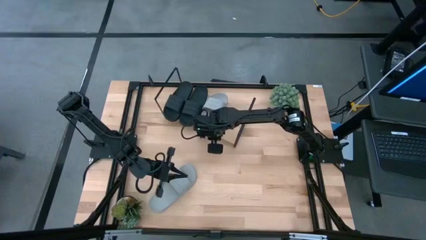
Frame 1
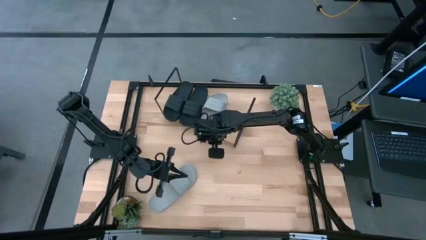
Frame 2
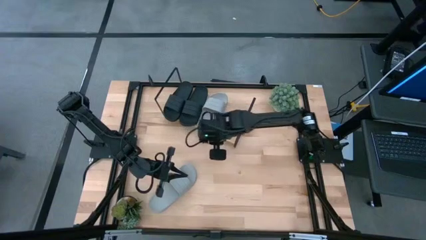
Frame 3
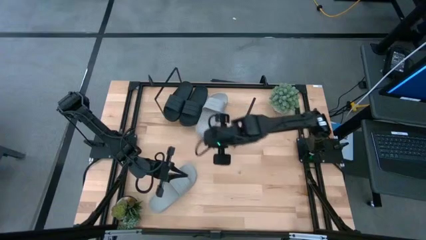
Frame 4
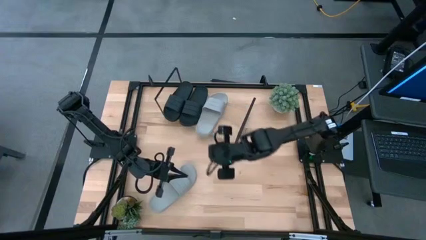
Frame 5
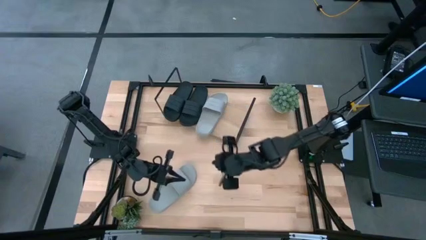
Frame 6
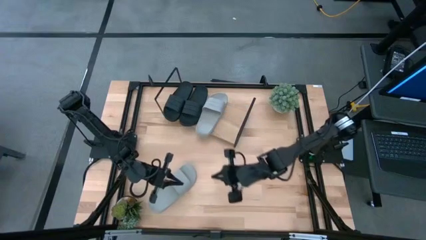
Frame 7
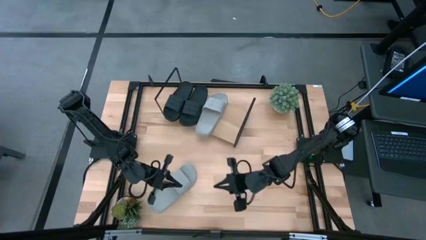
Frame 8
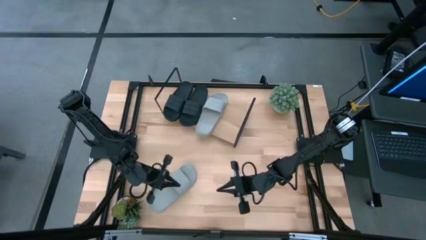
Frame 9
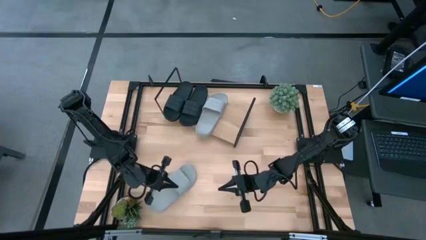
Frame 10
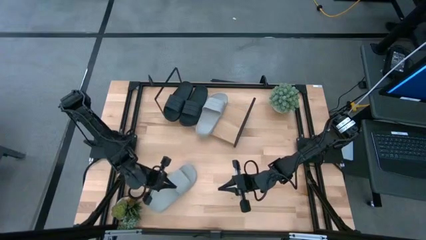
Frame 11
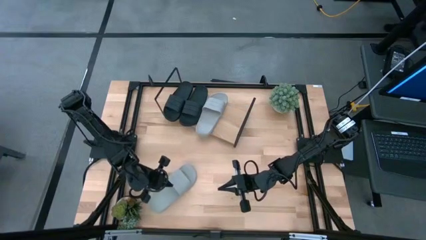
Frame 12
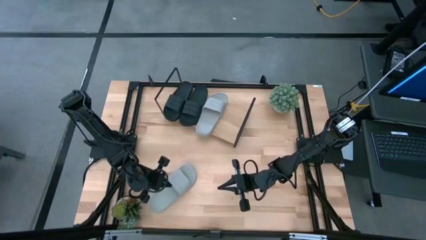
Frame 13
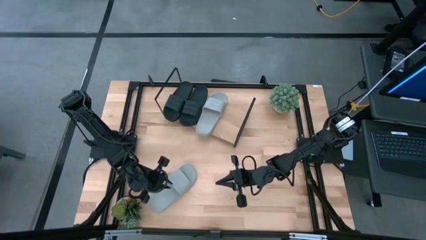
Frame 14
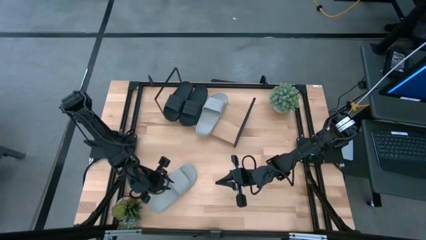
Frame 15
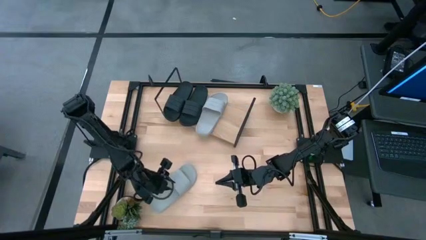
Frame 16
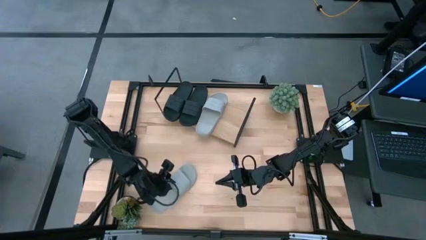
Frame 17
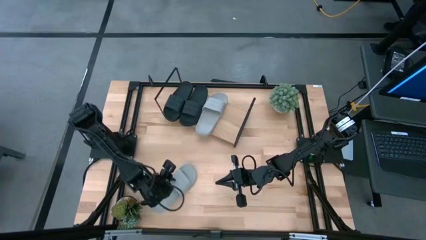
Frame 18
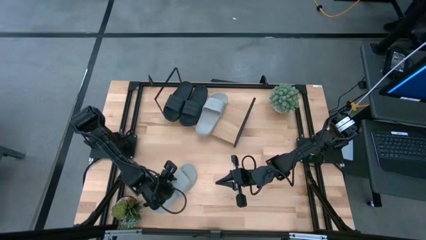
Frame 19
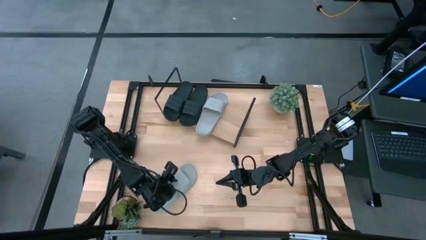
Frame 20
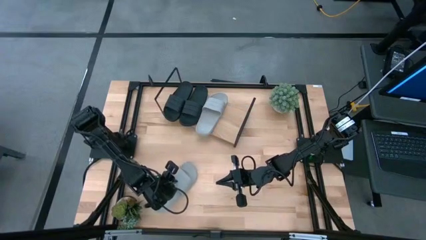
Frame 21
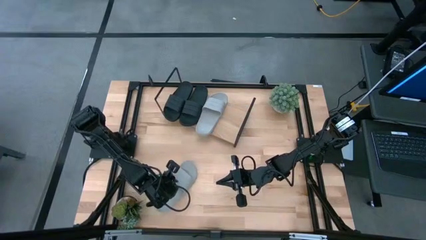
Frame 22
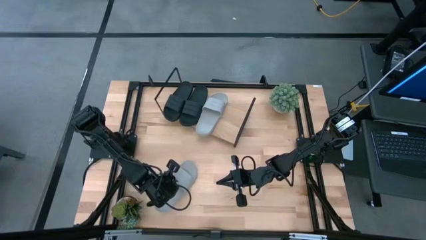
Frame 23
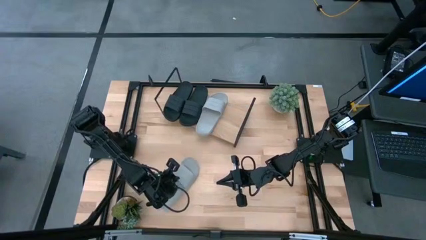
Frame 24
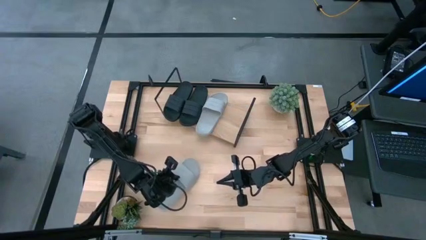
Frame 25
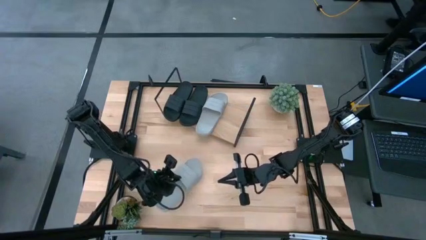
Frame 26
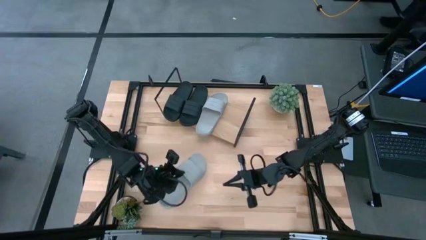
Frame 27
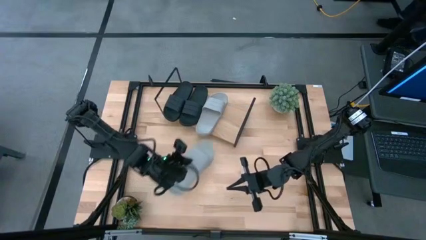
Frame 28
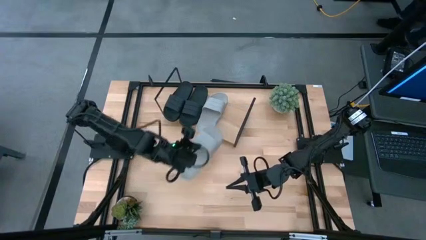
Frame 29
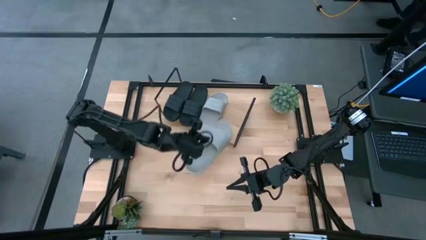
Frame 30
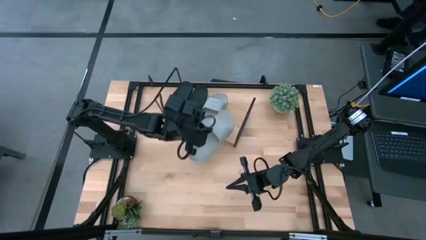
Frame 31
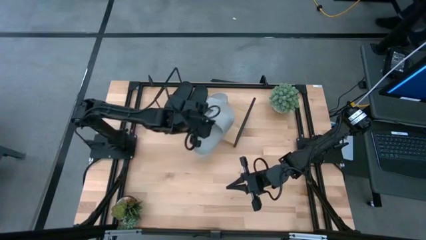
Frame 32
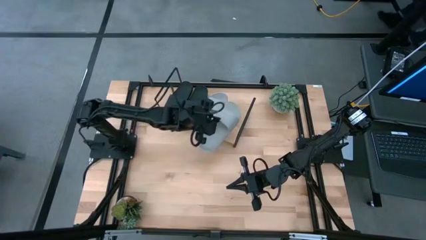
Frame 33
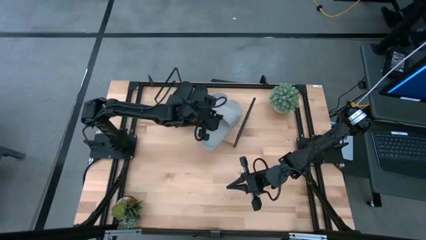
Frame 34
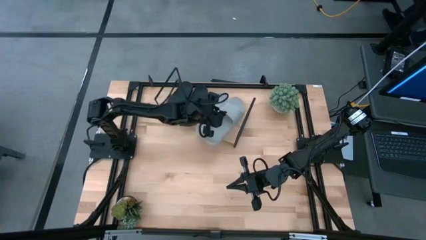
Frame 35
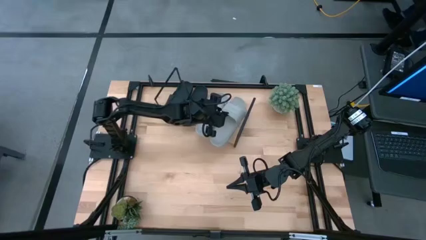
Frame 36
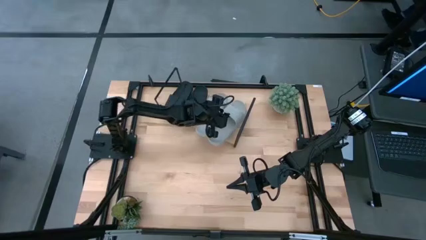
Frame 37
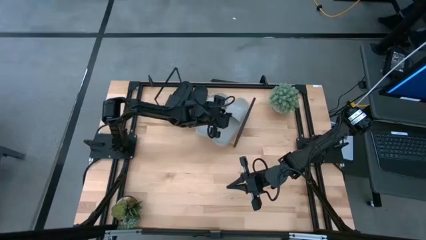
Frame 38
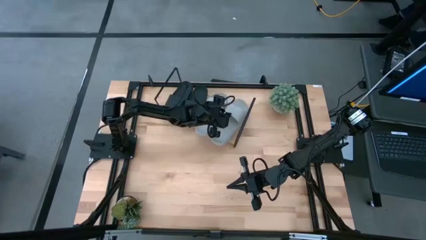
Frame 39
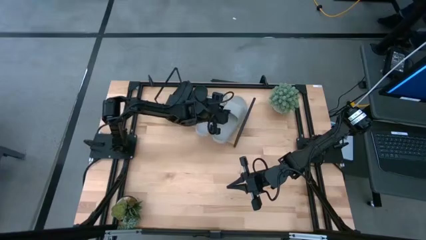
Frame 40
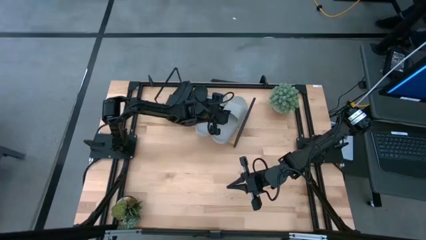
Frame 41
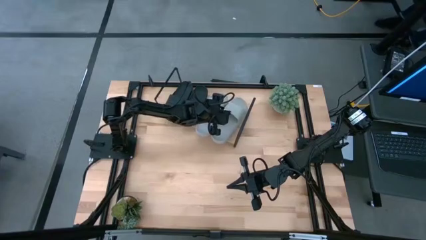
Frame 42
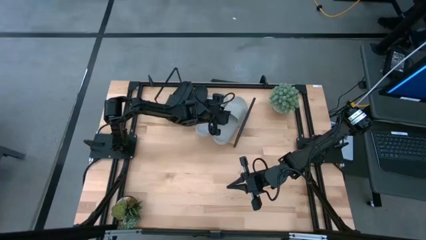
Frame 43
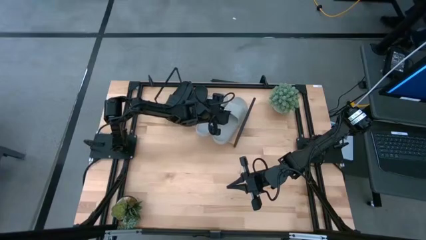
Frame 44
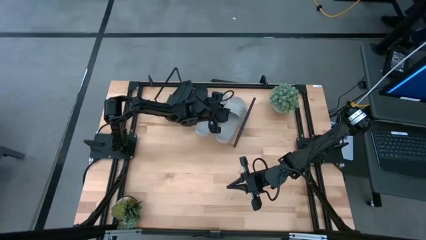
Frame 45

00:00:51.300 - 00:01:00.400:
Task: Pick and place slides into the shelf
Put the gray slide on the shelf

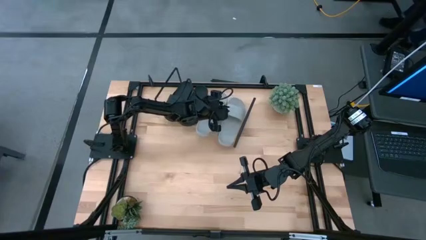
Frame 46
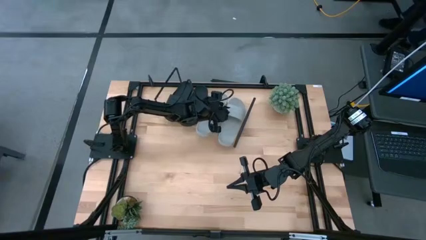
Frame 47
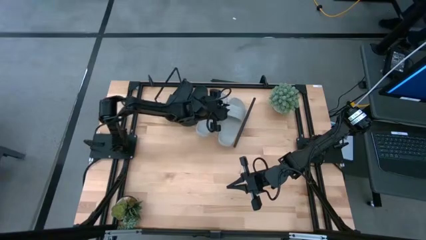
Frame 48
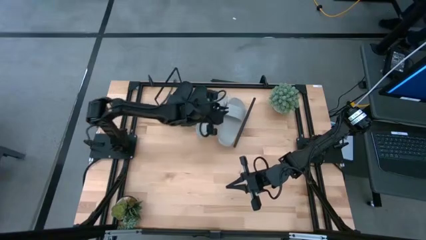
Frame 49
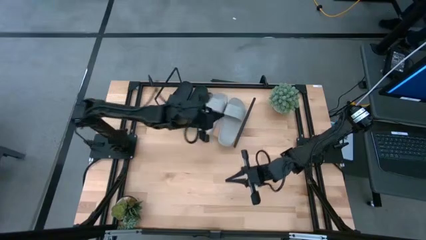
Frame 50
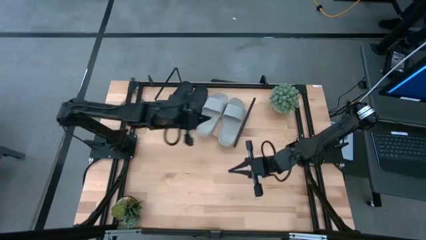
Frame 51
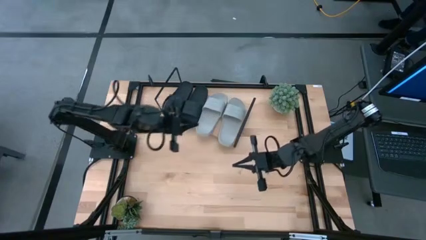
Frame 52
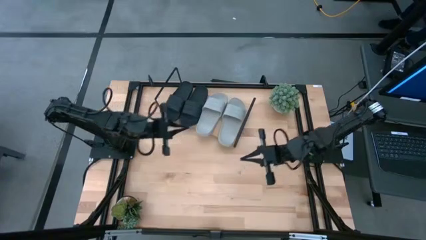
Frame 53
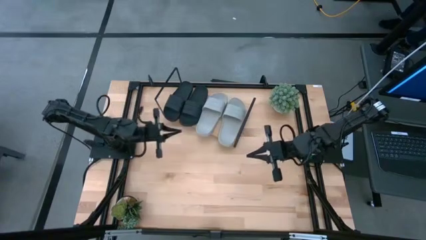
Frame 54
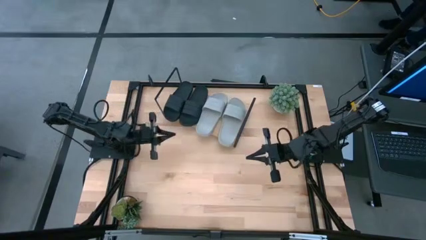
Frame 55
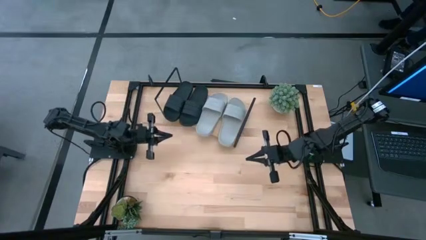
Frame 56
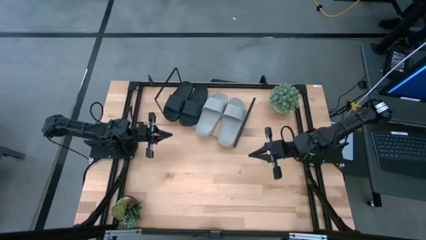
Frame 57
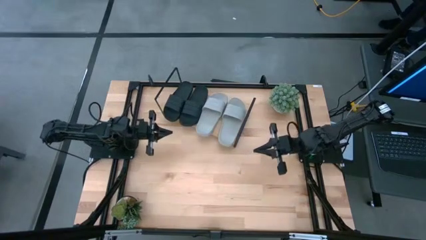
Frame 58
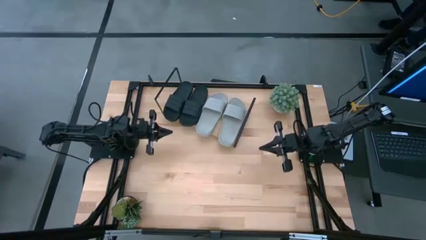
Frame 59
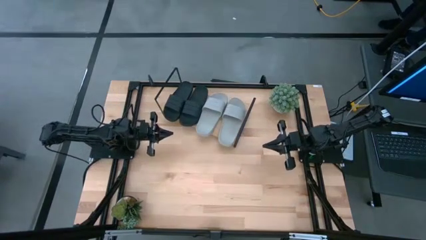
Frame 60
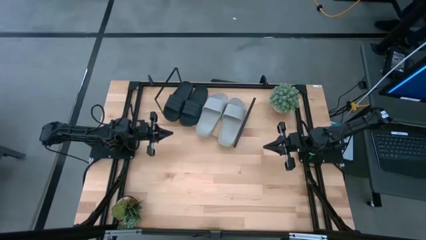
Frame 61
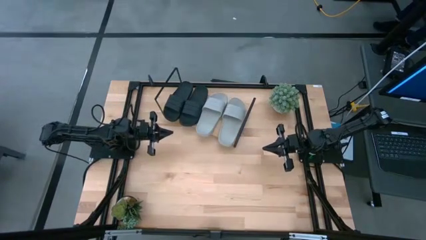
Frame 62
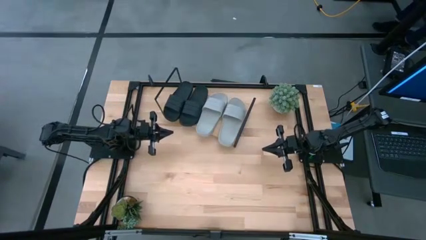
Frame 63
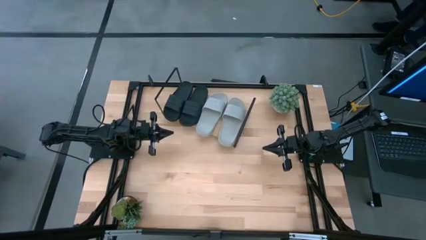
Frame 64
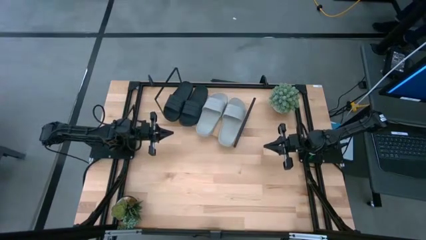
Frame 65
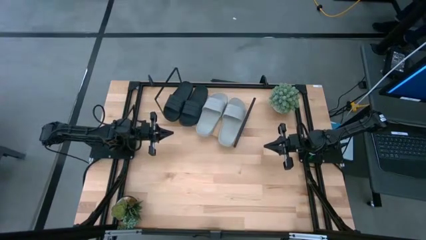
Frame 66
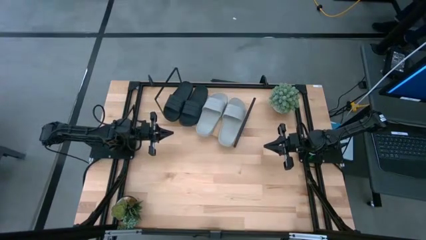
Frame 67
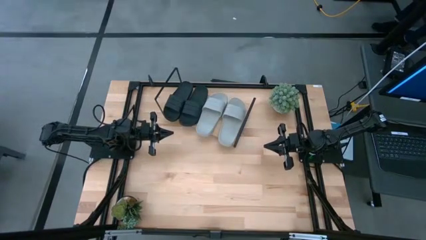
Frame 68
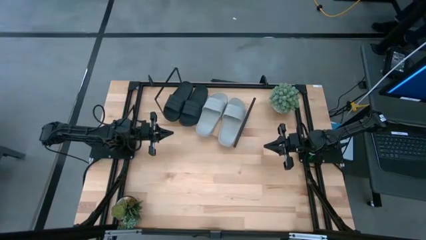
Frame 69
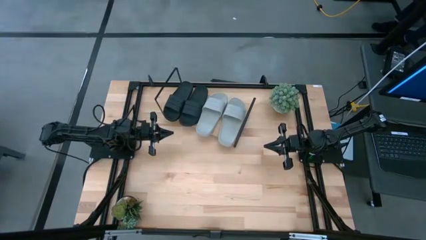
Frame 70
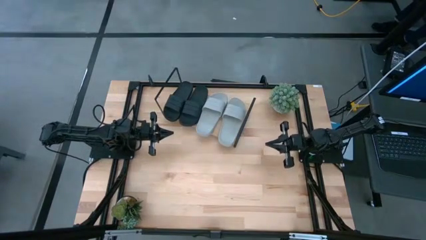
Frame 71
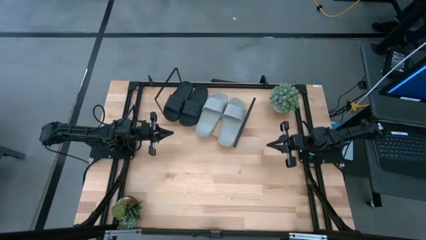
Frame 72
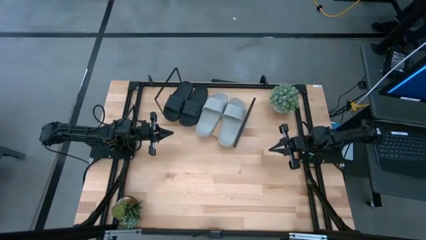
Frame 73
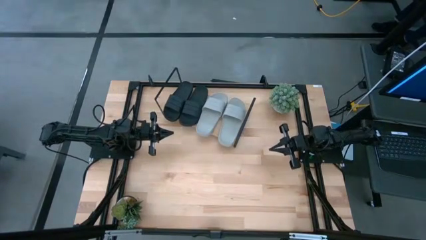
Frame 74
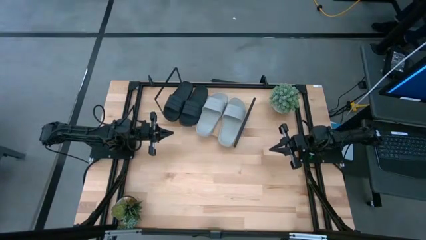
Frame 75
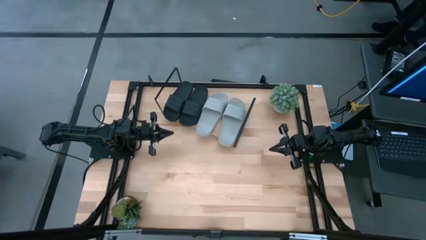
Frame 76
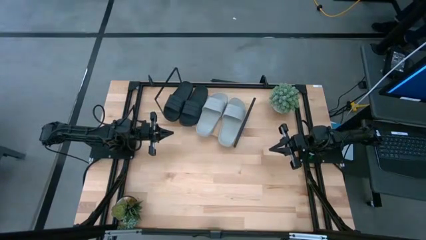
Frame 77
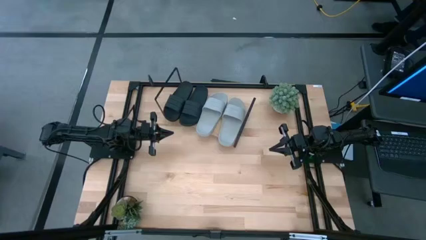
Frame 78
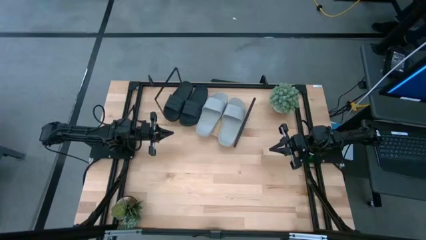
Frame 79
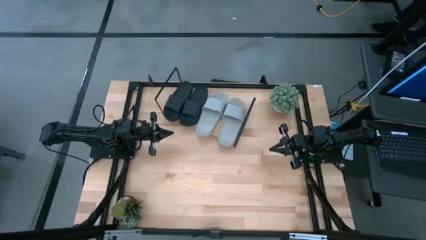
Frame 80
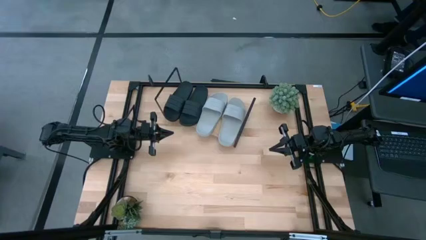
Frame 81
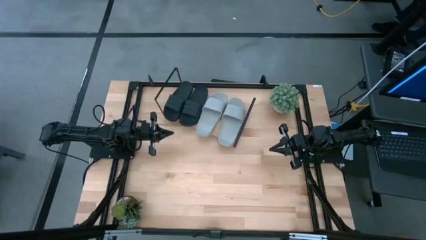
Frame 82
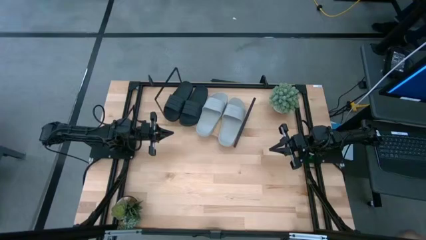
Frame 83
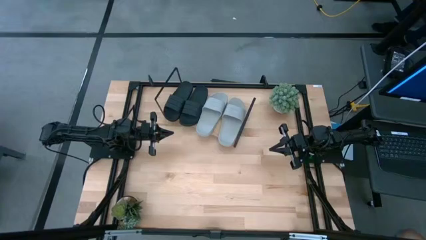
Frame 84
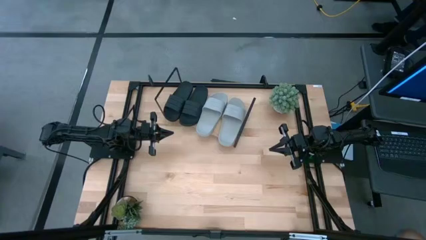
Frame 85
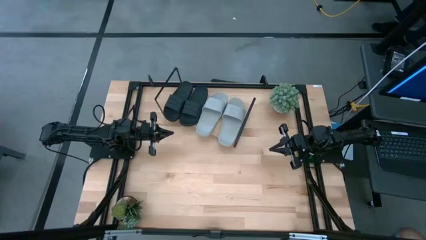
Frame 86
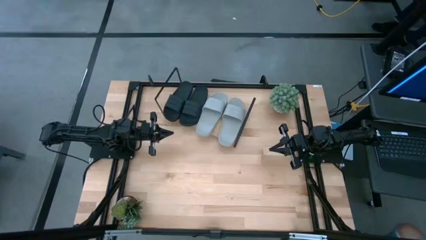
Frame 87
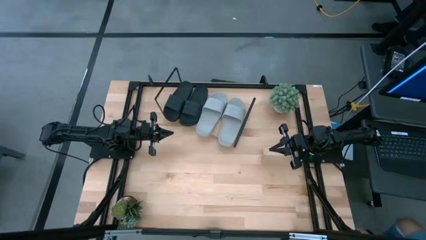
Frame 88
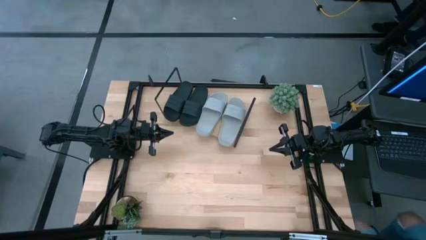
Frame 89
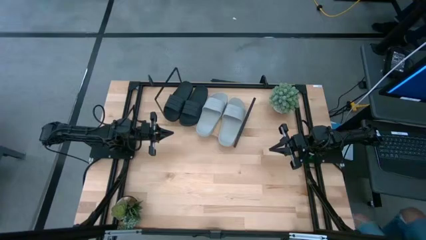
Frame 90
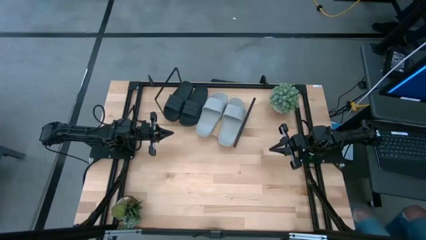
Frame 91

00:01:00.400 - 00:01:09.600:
Return to Home Position
